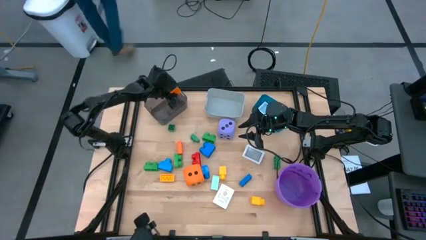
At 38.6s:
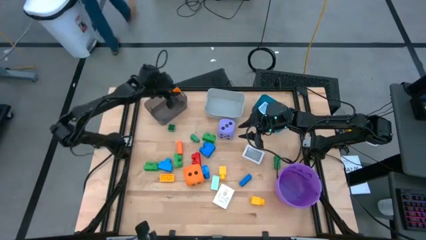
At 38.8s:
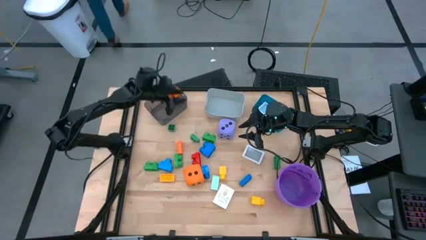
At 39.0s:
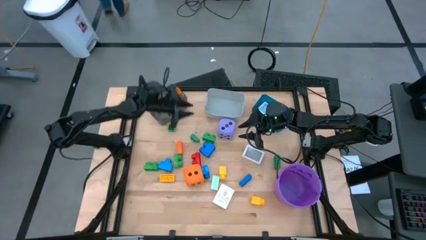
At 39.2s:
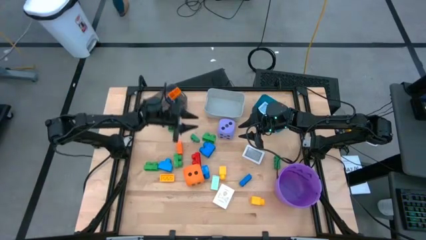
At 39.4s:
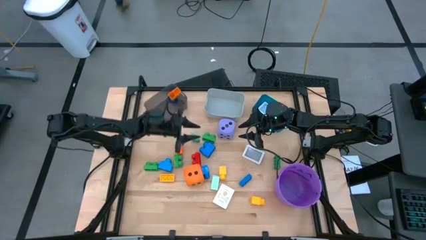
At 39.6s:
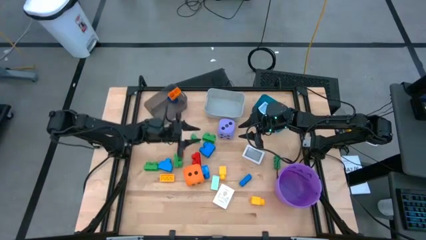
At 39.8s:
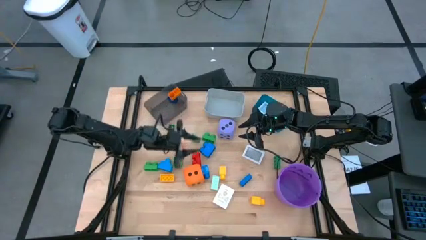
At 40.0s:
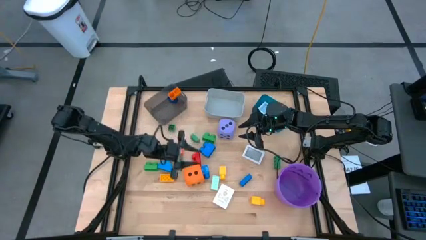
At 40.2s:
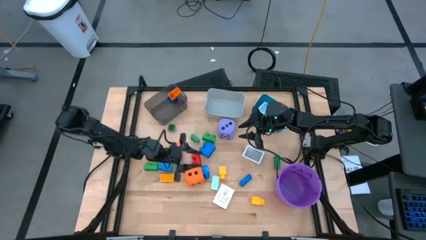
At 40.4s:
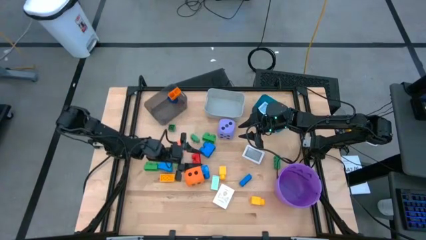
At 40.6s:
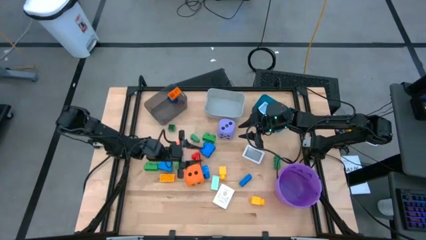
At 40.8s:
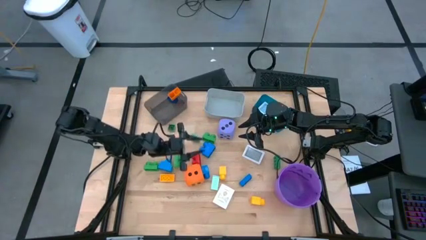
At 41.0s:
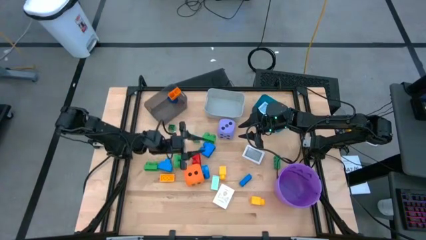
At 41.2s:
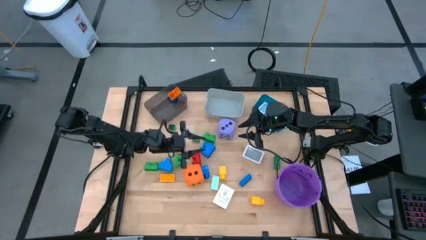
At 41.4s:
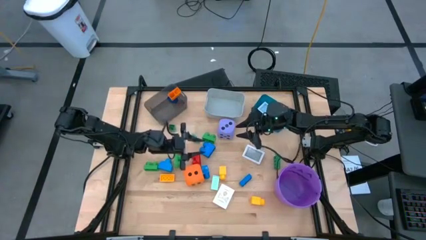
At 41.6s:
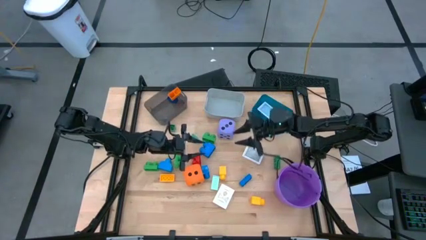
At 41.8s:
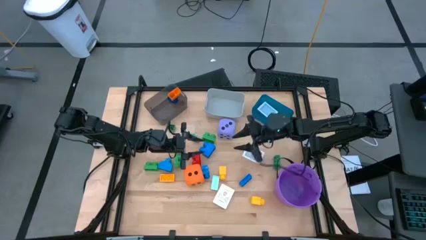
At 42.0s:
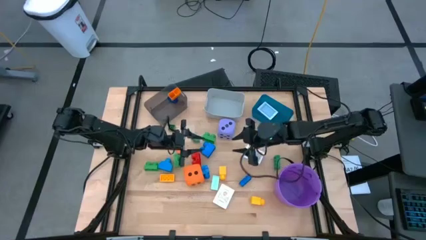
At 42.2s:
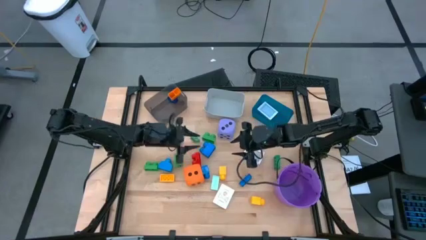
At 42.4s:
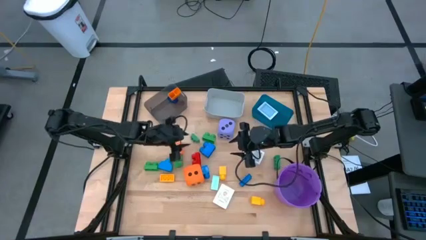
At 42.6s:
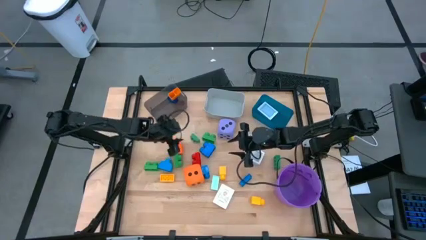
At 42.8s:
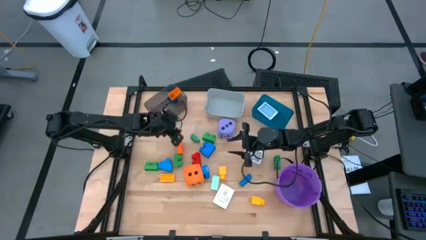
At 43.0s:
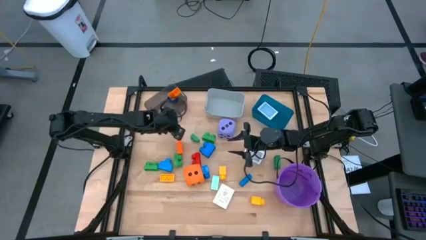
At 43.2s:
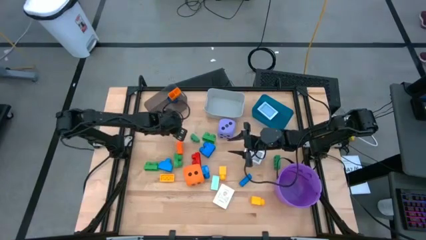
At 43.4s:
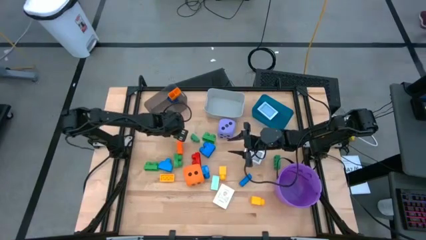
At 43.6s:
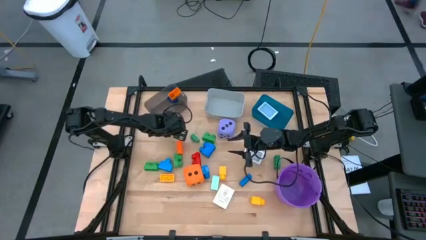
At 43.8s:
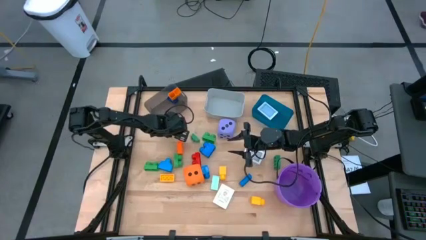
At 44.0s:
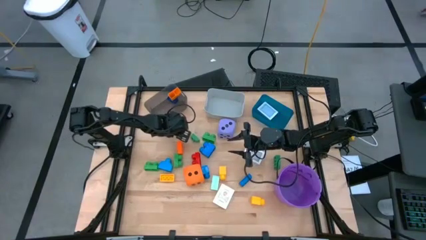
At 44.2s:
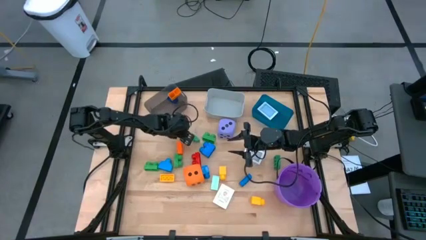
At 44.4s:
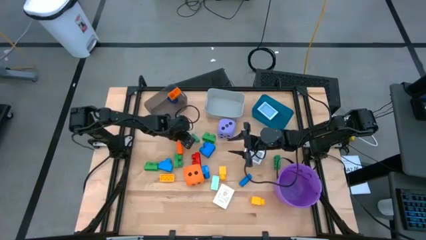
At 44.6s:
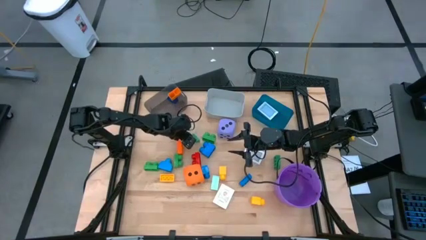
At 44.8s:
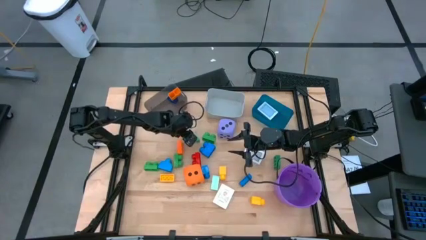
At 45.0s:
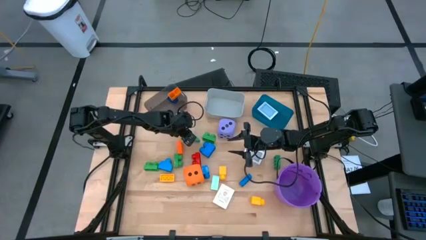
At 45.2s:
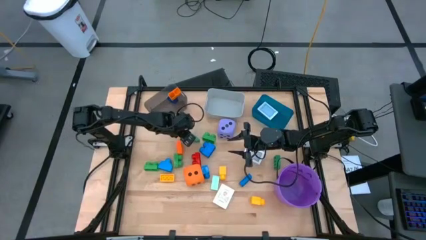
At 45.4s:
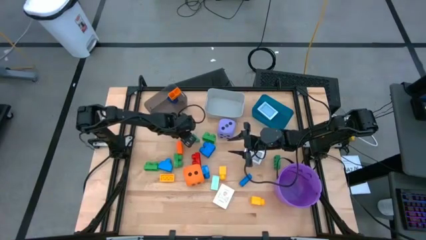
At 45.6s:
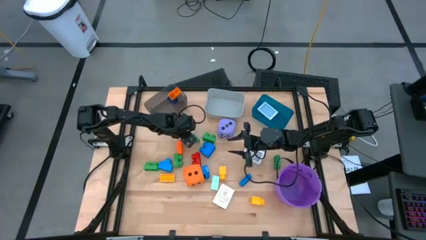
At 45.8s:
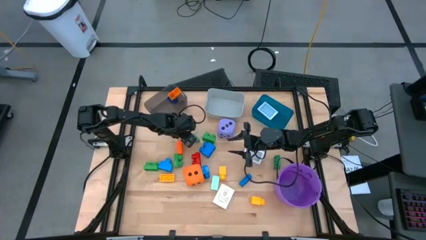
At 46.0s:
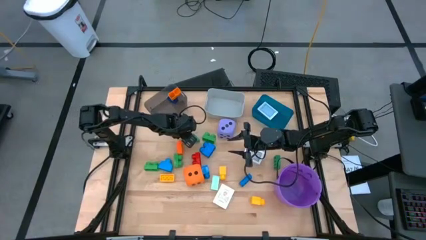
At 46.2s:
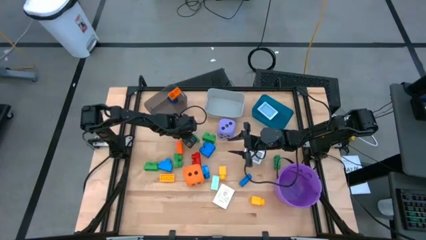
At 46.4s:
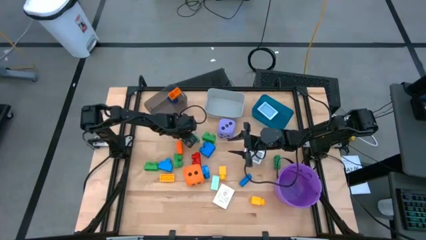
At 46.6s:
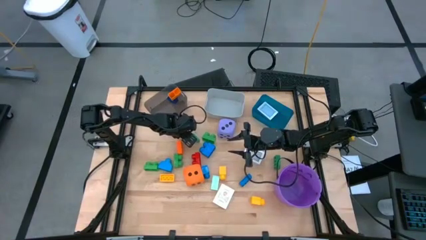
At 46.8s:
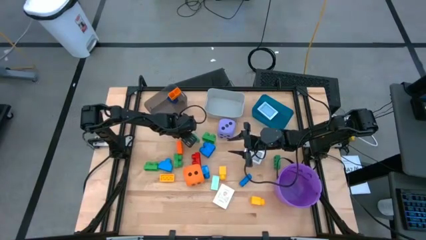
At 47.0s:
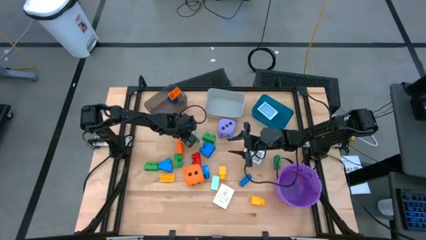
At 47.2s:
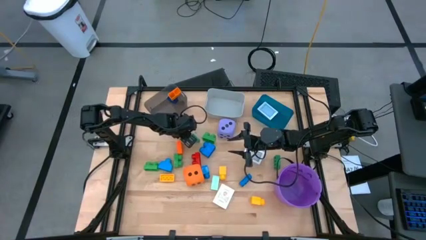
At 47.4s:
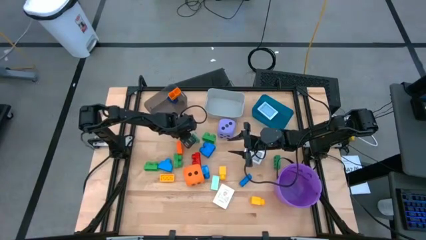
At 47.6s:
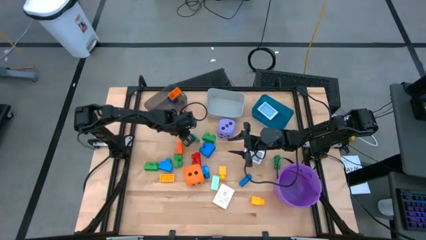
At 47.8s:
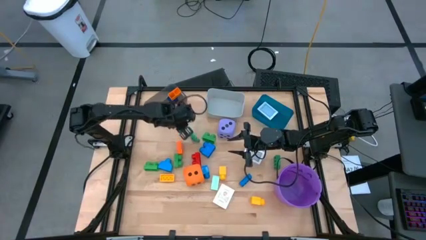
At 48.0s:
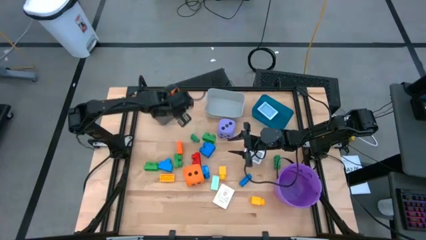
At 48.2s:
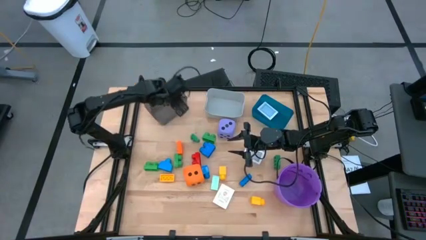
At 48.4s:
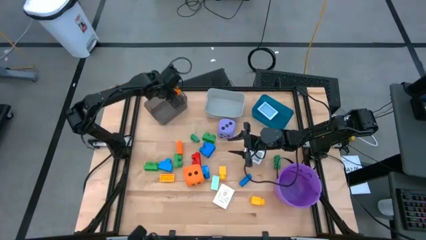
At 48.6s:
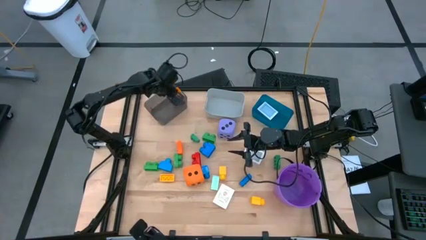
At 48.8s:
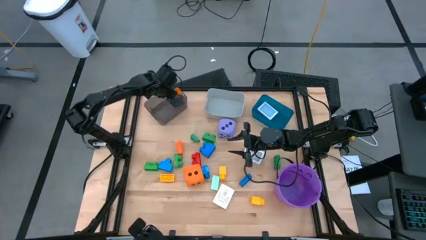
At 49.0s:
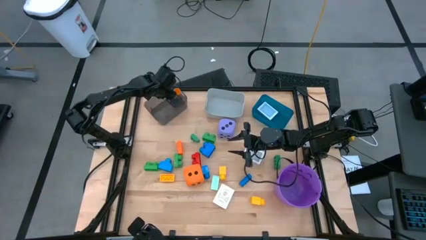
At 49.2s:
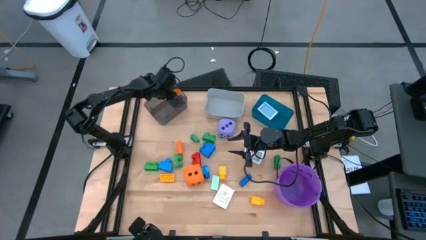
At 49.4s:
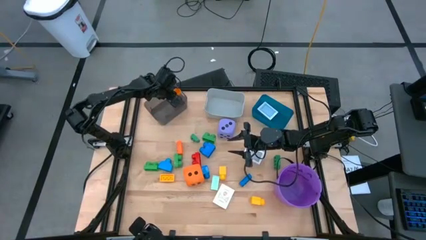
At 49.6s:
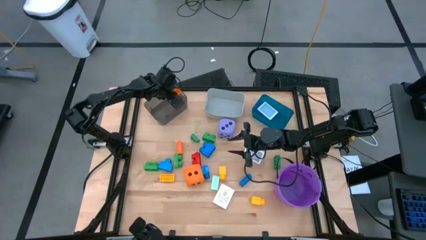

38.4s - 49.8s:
Task: Pick & Place Toys
Put the green gamepiece into the black bin

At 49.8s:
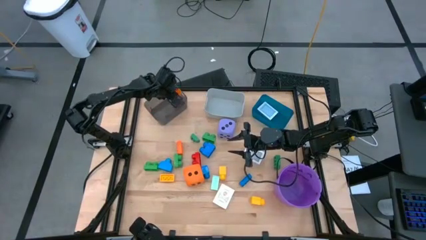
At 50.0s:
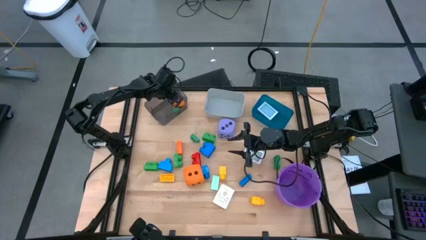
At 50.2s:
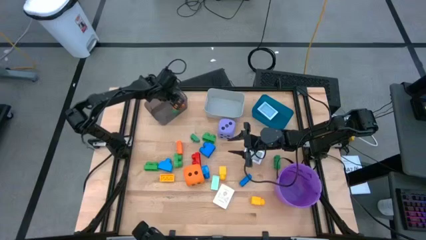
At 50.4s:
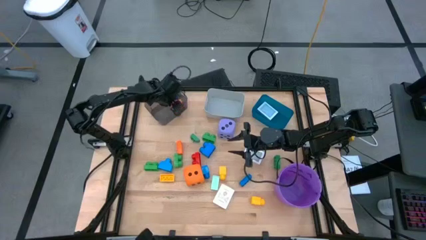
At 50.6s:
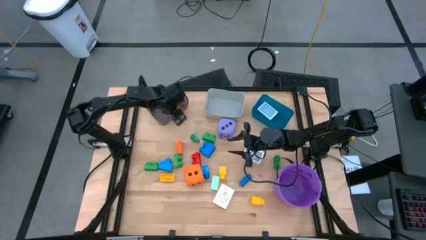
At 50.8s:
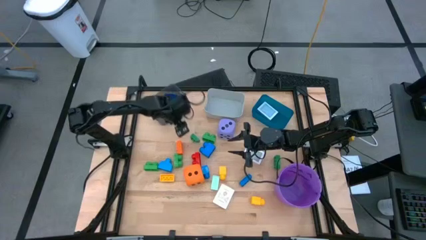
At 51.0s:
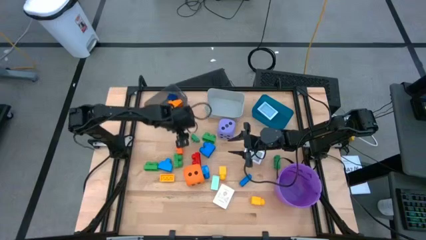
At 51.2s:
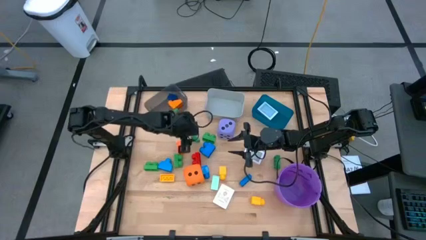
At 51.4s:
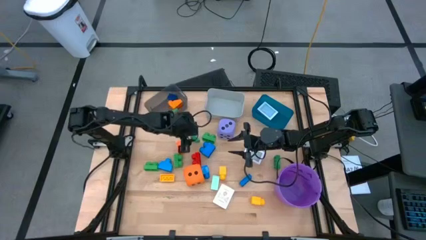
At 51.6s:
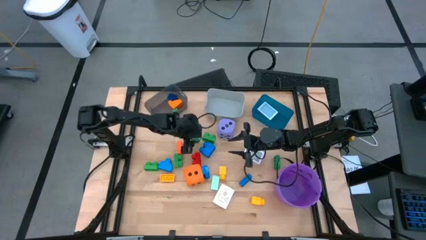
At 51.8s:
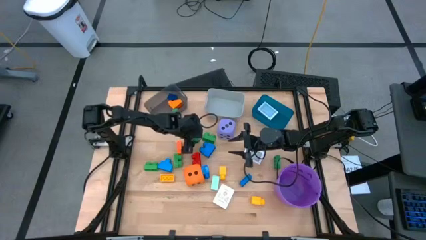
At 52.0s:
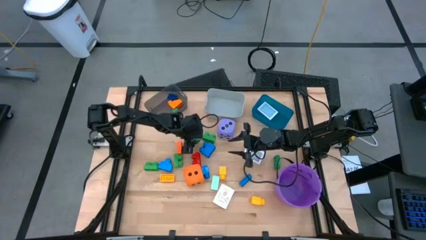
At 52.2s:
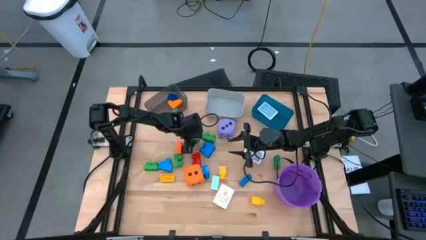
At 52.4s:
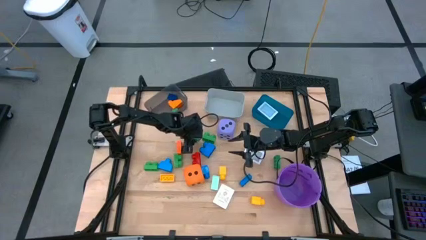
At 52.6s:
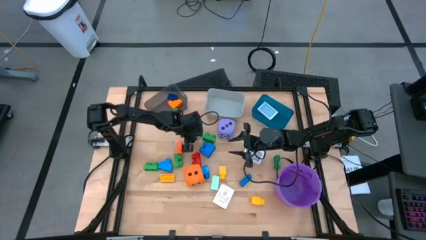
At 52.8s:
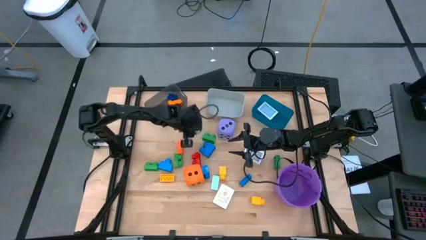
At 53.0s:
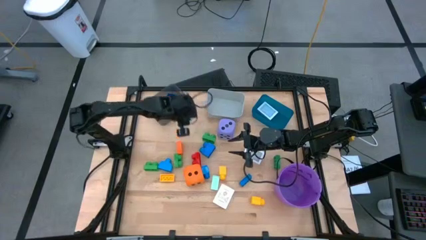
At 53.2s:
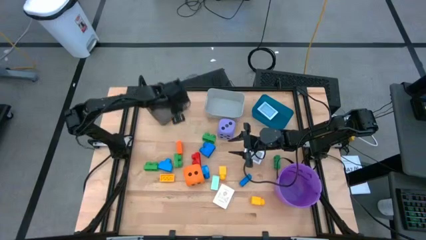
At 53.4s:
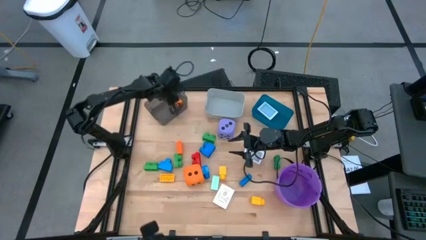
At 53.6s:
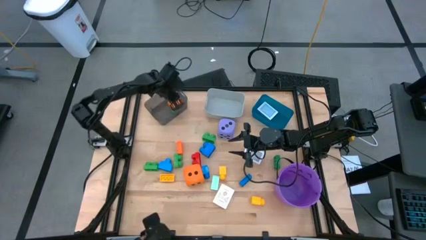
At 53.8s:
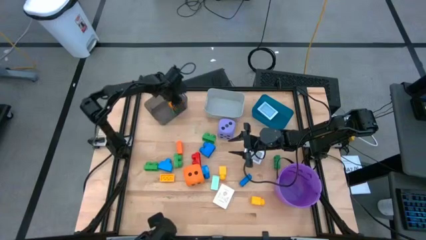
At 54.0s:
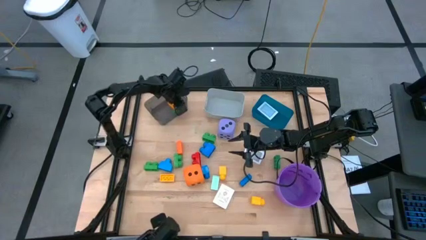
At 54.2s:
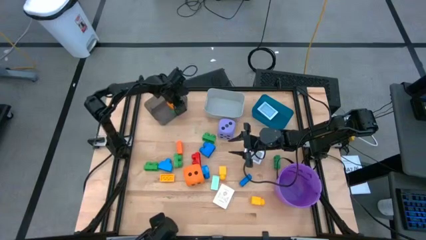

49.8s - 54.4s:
Put the green gamepiece into the gray bin
